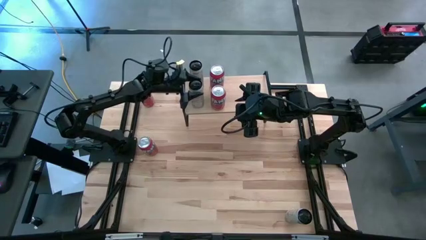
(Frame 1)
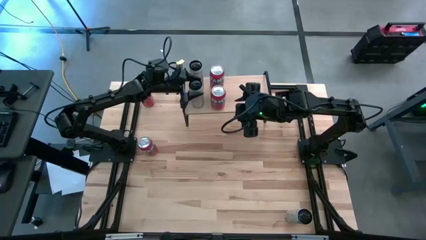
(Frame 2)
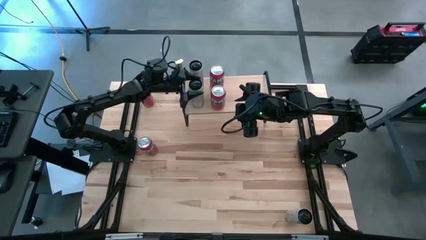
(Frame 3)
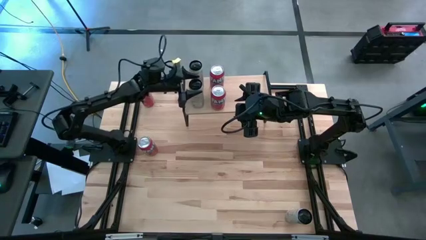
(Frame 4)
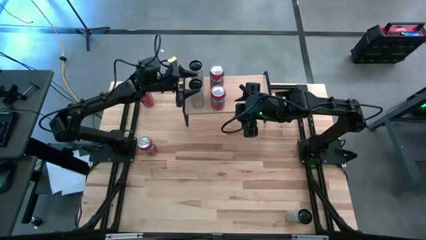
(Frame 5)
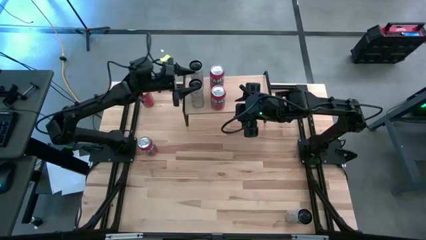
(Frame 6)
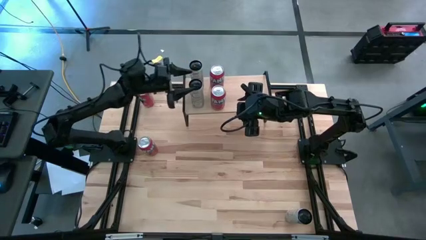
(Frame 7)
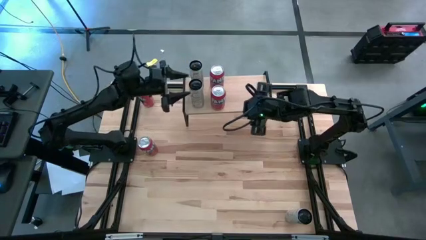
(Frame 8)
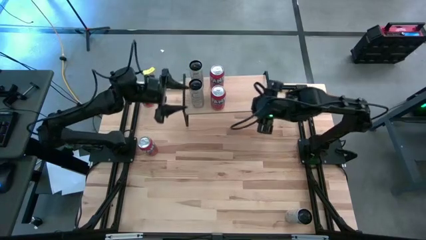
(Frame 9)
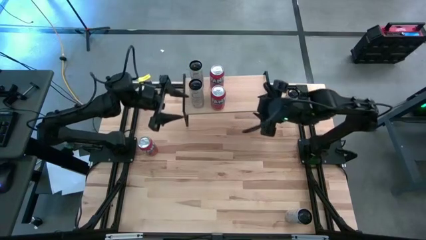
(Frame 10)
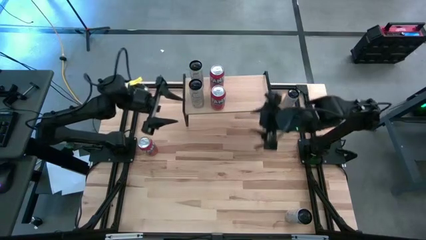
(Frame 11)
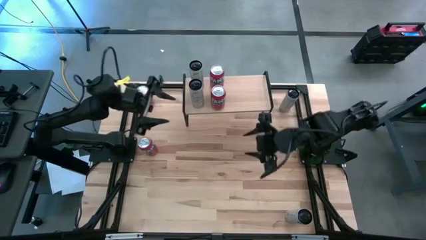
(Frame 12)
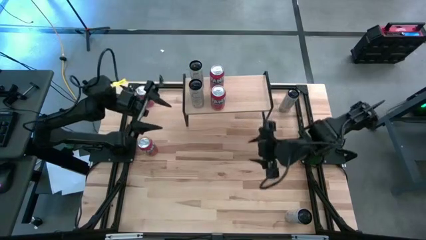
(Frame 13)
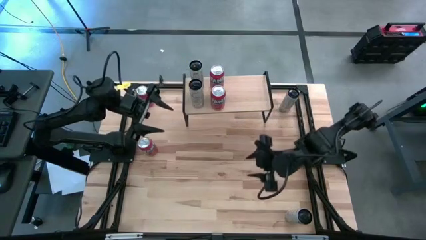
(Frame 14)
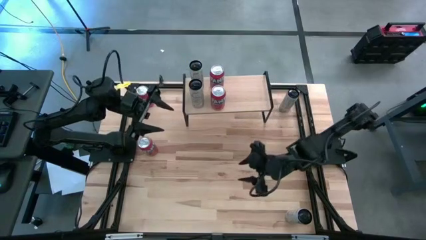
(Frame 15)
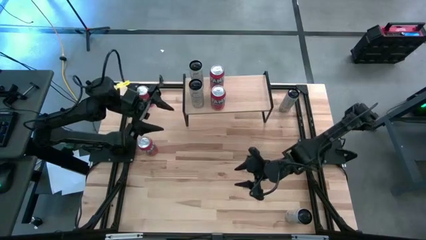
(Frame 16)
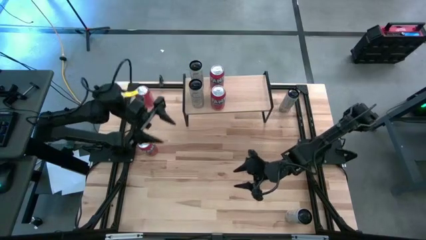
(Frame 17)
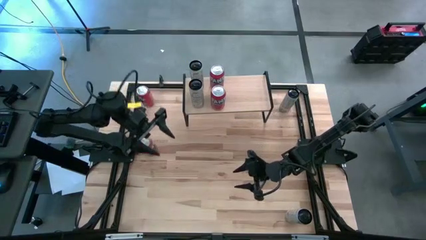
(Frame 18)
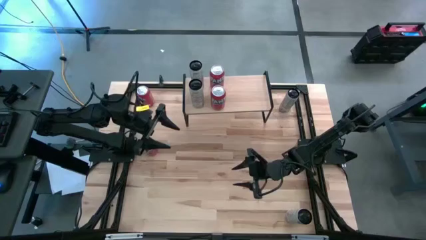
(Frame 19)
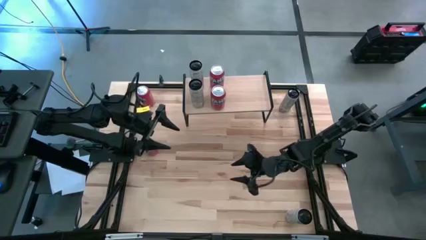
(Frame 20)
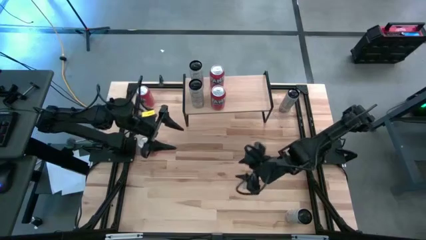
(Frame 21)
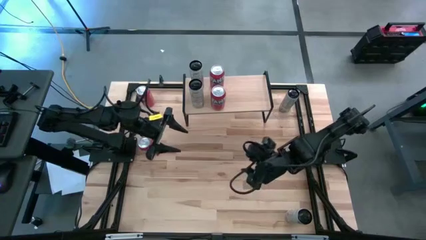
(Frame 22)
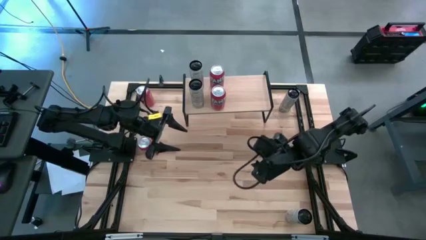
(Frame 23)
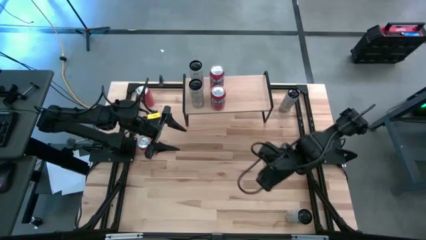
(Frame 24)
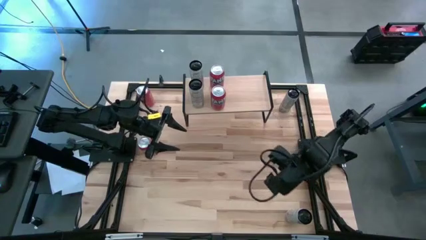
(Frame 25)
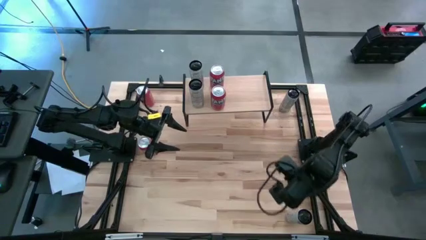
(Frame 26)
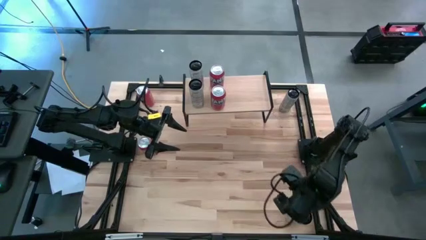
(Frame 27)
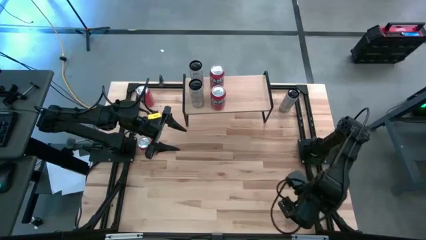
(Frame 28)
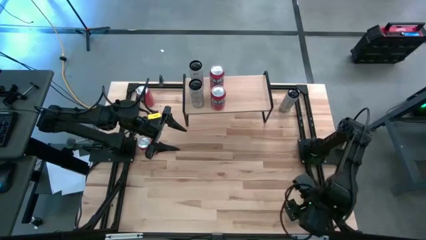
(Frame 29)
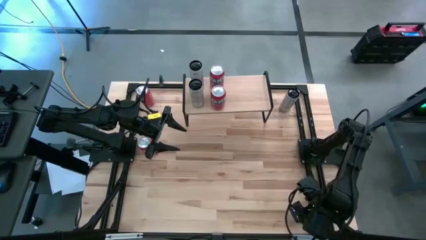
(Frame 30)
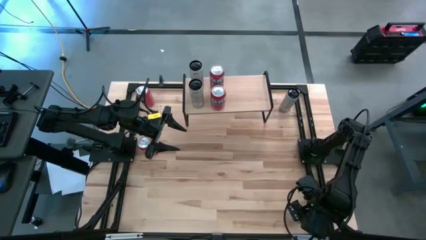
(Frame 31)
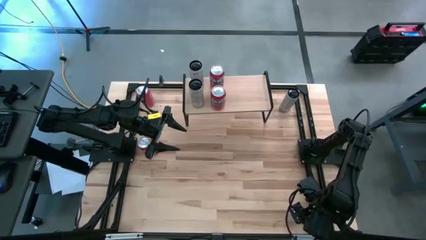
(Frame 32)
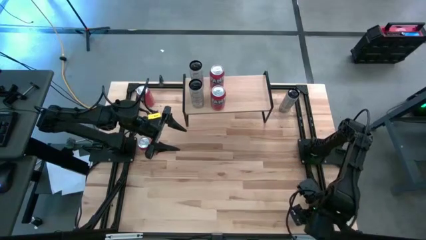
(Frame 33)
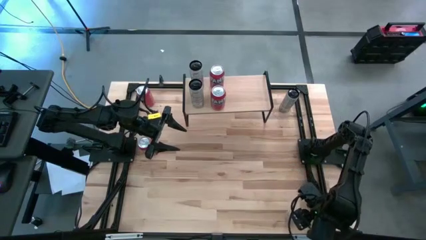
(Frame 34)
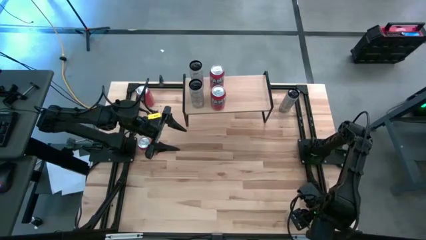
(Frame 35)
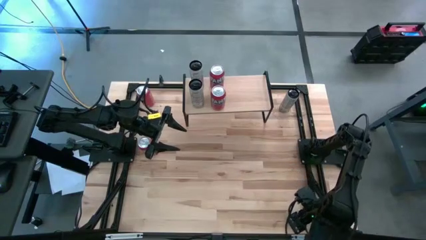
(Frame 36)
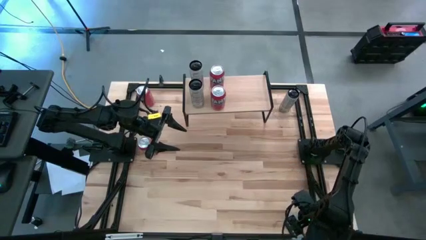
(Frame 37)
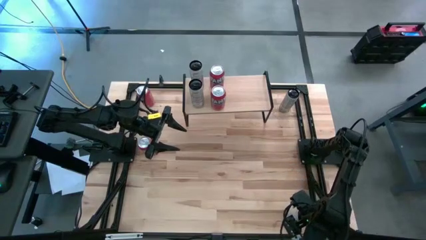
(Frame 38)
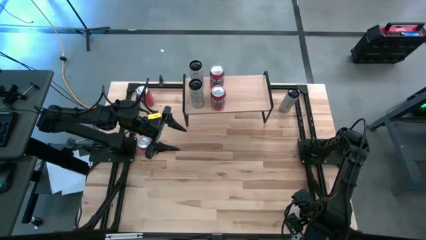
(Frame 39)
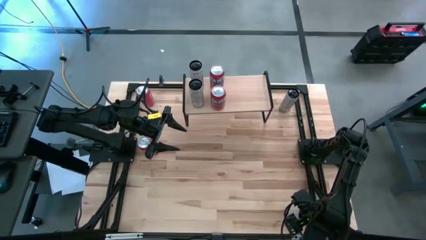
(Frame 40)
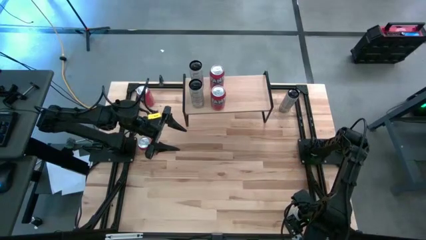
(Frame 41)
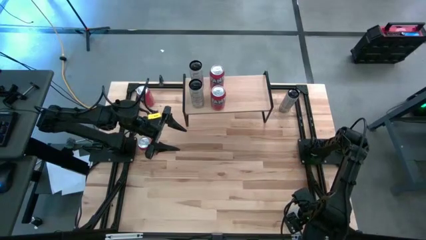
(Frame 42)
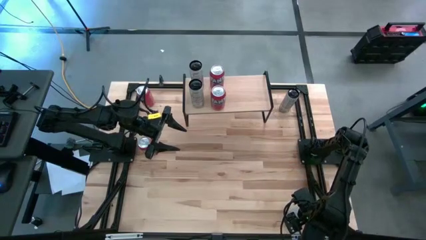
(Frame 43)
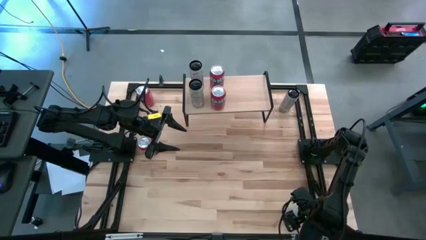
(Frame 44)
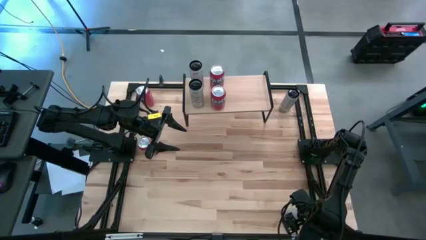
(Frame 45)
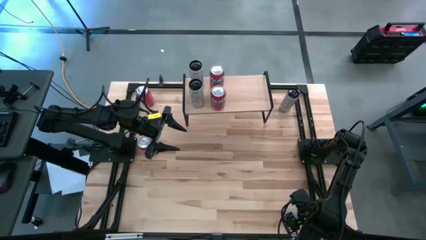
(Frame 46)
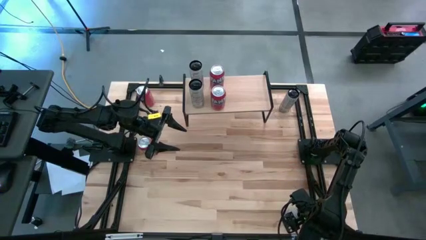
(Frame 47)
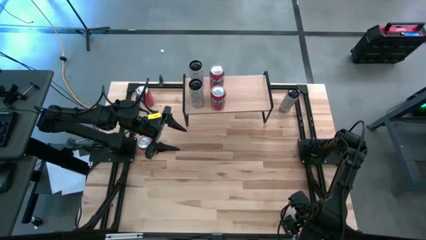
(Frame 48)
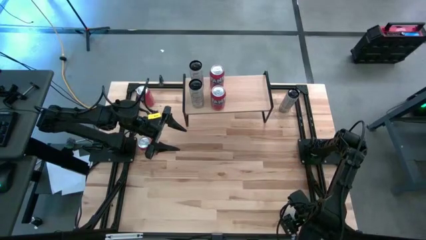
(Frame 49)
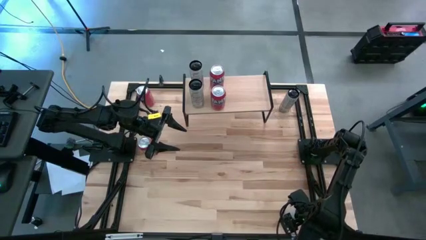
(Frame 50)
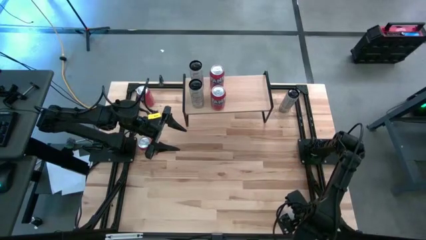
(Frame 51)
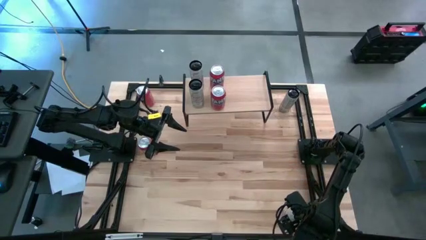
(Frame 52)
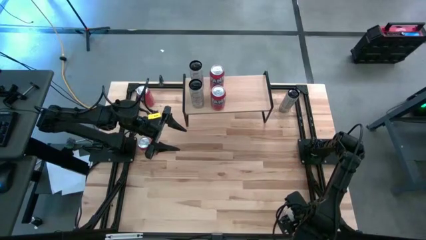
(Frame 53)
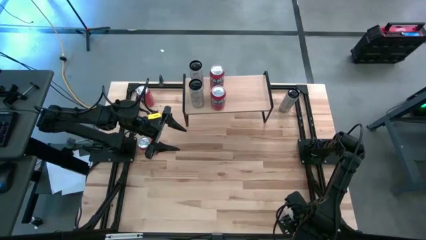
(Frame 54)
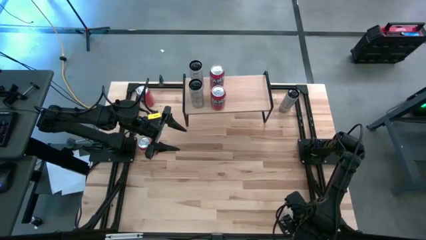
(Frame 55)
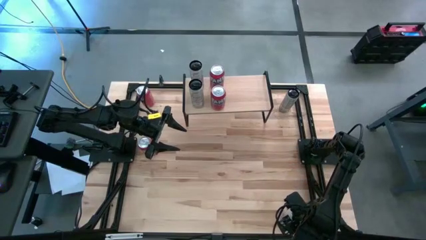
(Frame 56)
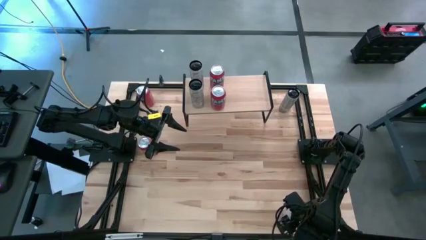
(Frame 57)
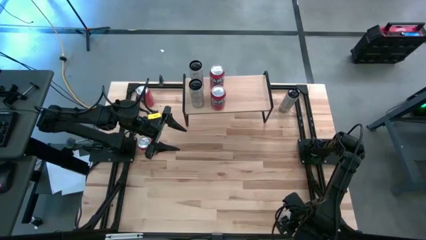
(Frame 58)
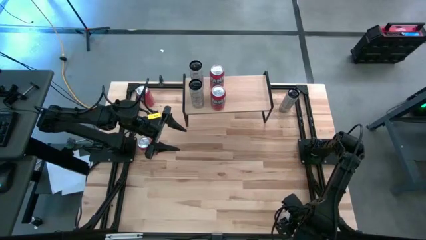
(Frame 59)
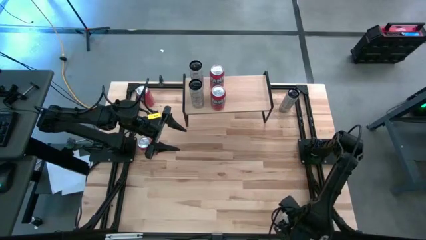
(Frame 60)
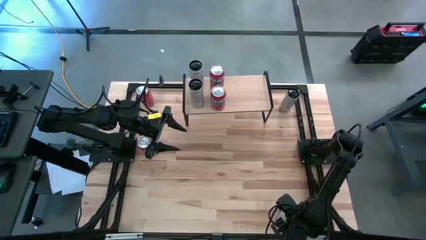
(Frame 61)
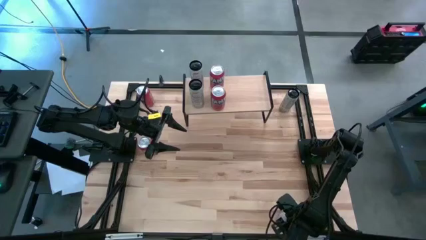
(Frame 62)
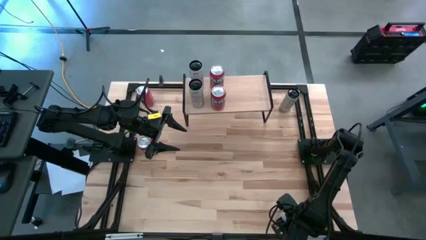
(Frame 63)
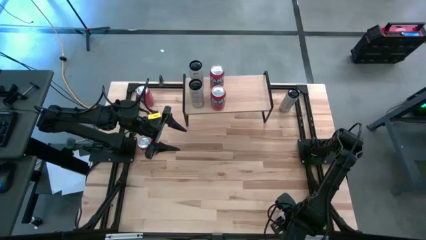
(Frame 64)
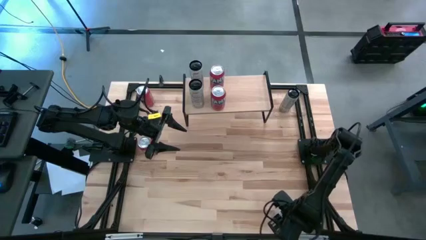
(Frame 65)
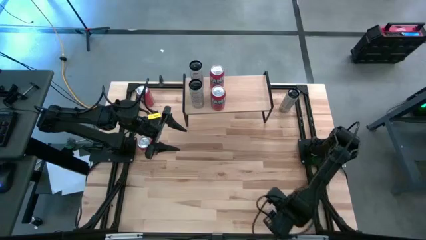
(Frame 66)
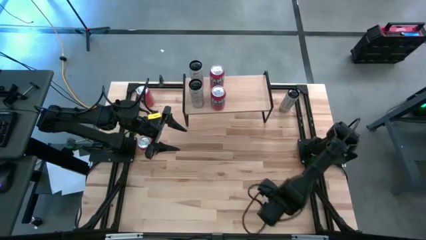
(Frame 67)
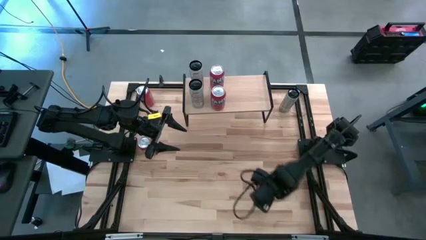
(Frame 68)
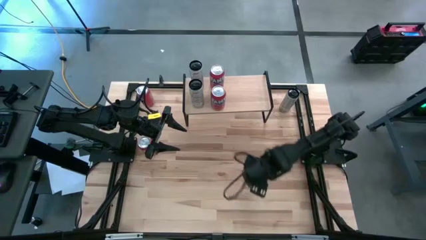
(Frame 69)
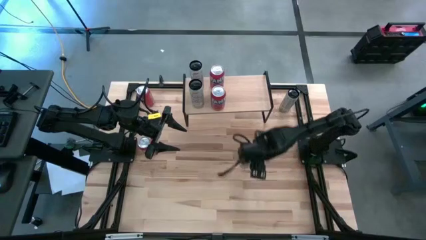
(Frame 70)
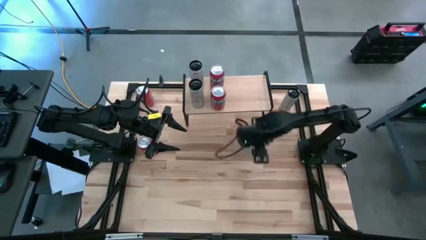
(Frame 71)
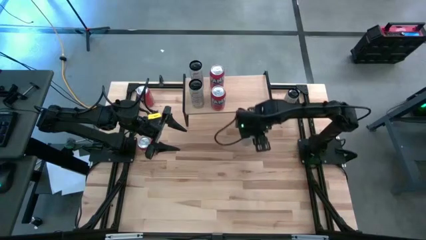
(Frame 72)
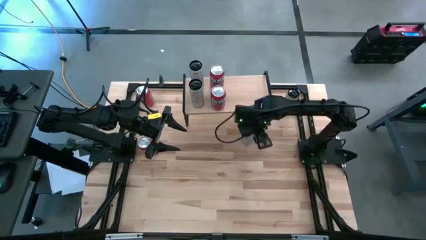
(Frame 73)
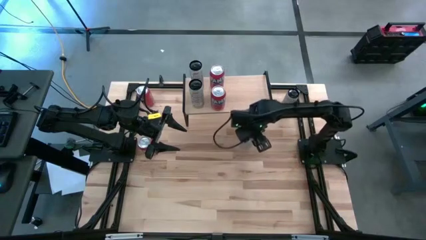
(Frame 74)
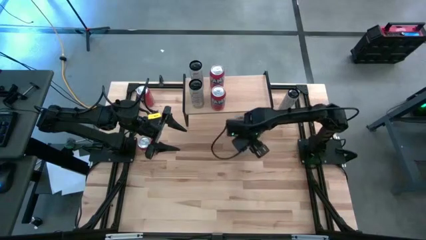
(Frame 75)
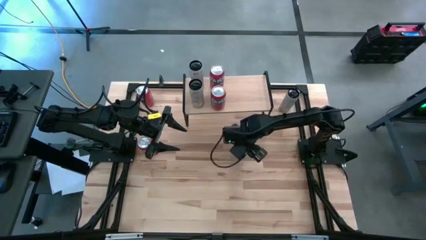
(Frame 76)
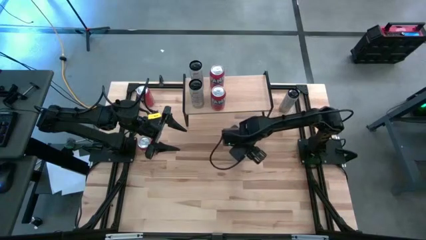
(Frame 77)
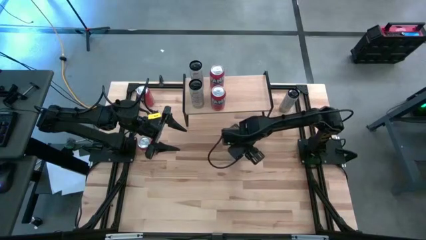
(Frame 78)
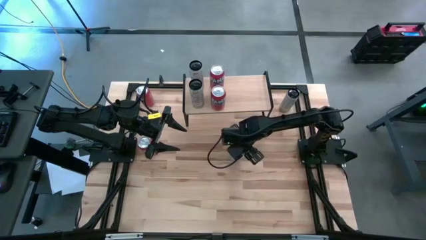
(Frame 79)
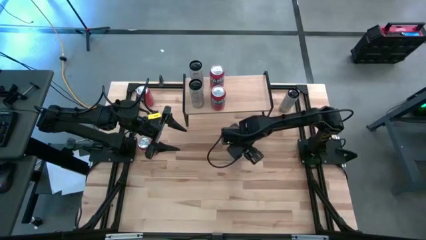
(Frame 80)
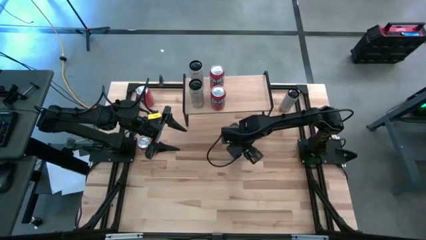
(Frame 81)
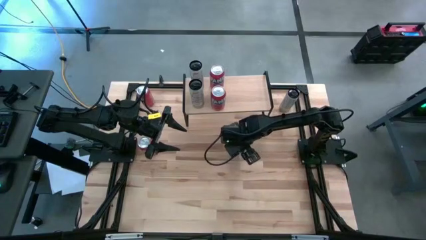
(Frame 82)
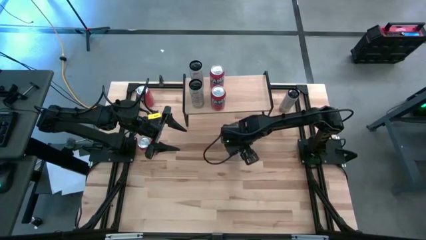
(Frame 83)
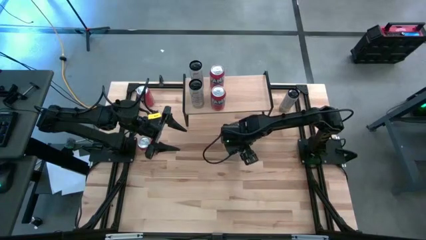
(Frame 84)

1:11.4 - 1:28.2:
Task: Place canned beverage on shelf
Put the white yellow soda can on the shelf
